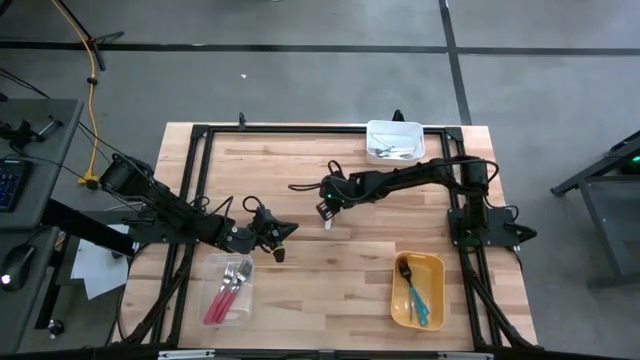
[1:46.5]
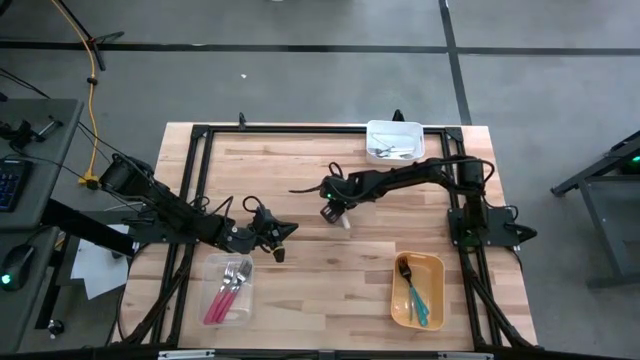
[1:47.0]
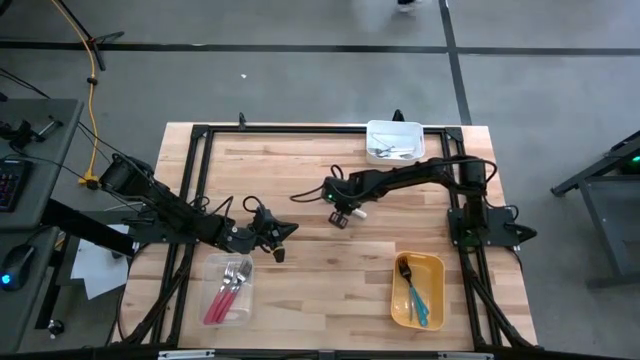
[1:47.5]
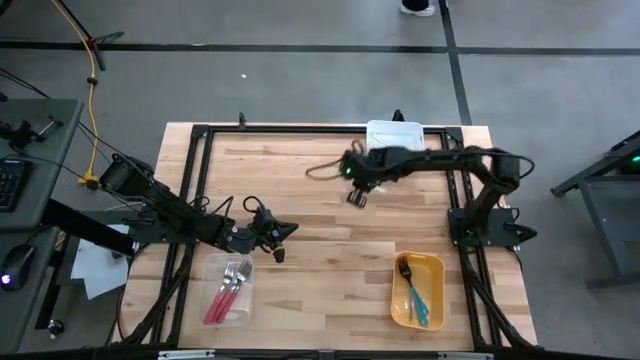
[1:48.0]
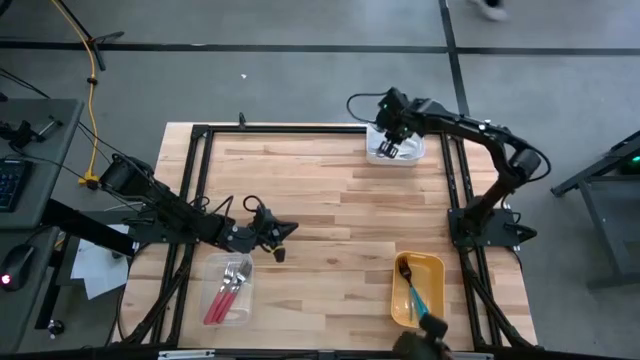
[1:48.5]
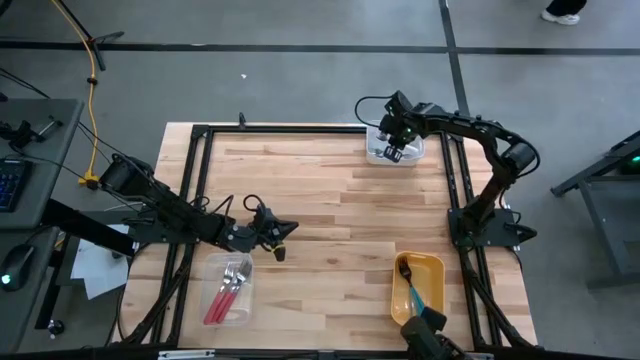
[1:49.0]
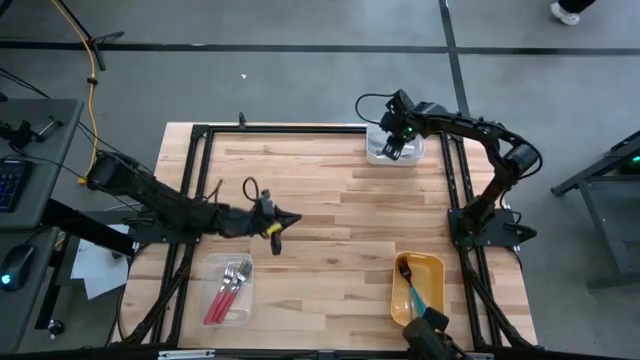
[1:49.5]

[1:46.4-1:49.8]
Task: Sort silverware by color (type)
Put the white fork into the white bin

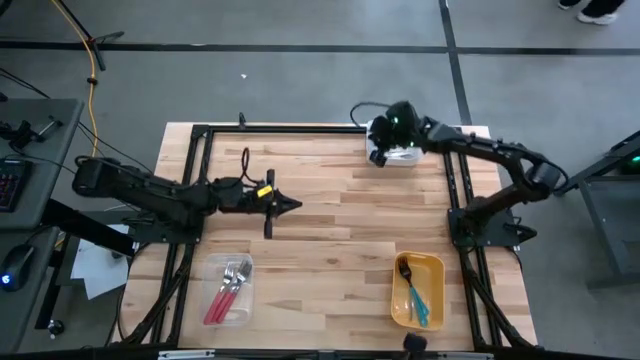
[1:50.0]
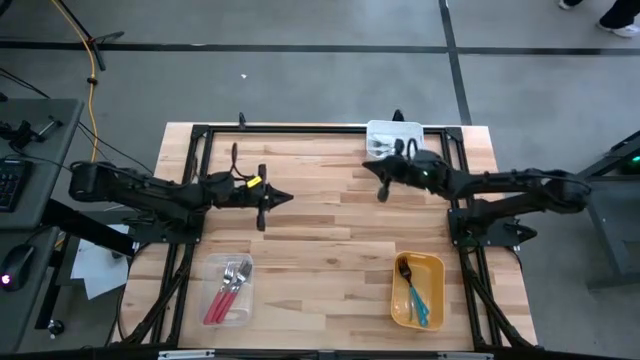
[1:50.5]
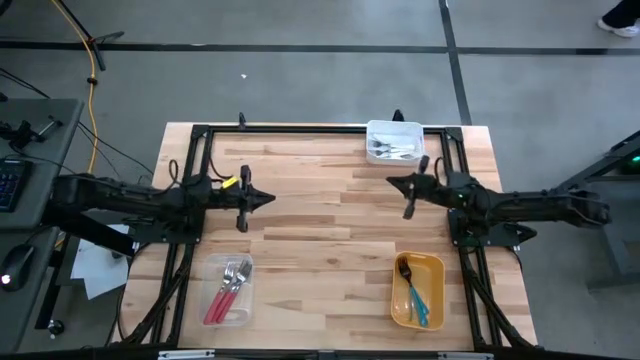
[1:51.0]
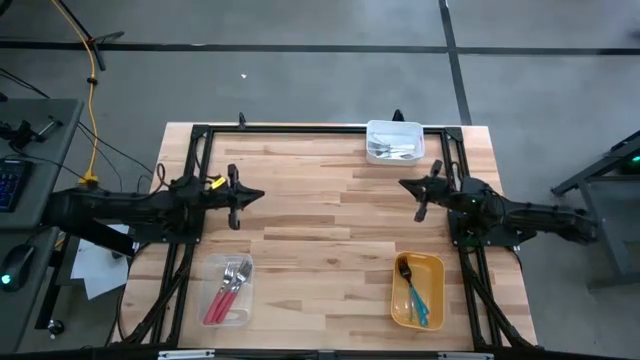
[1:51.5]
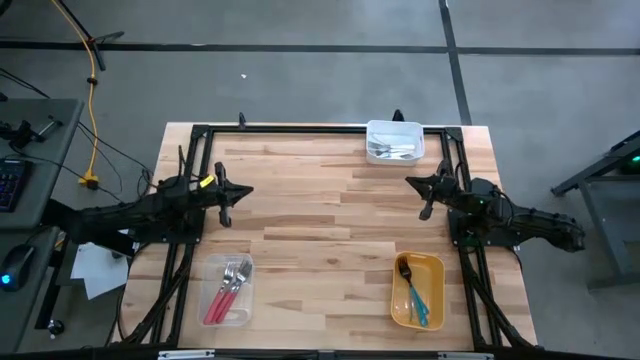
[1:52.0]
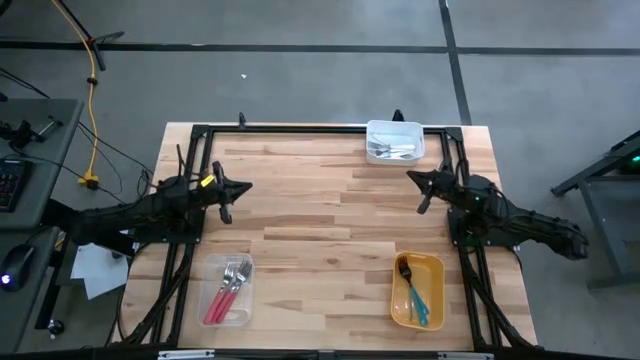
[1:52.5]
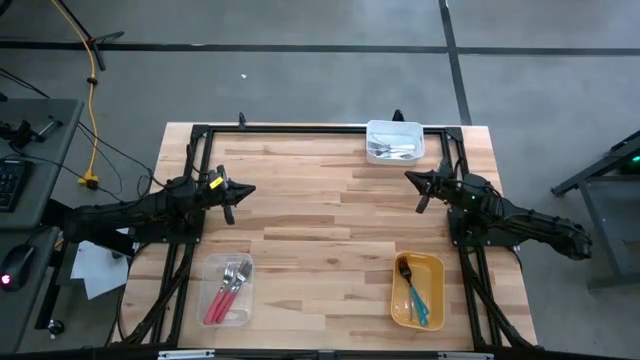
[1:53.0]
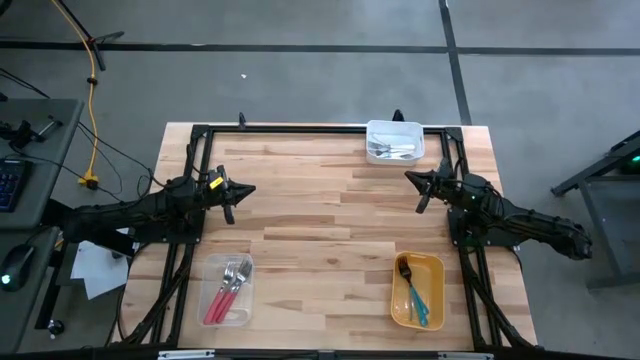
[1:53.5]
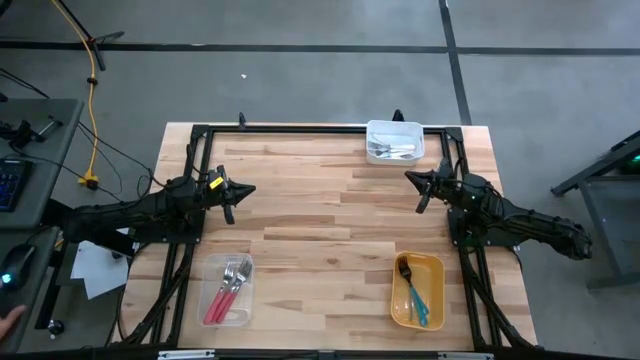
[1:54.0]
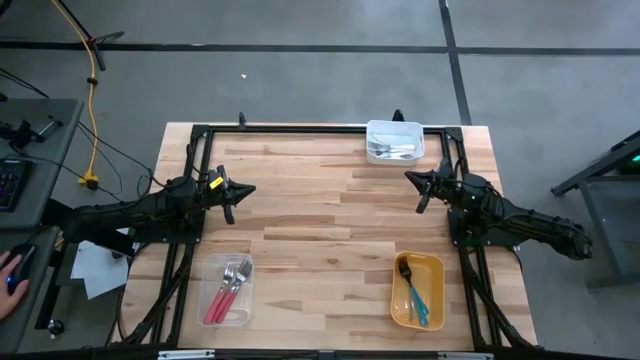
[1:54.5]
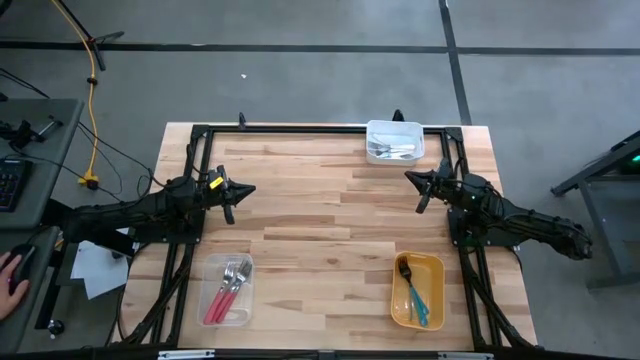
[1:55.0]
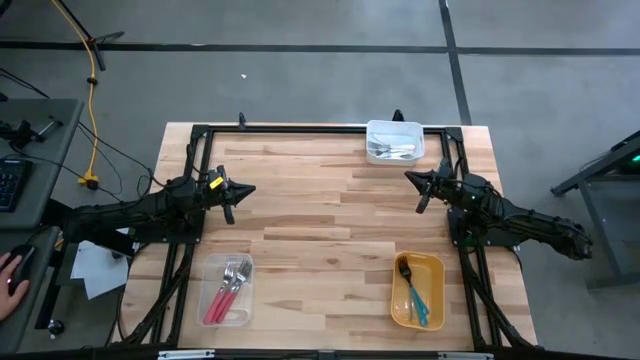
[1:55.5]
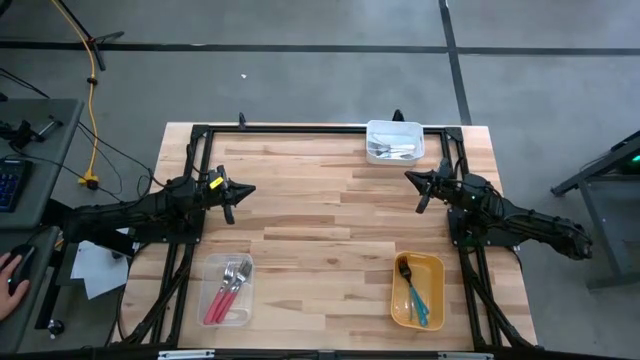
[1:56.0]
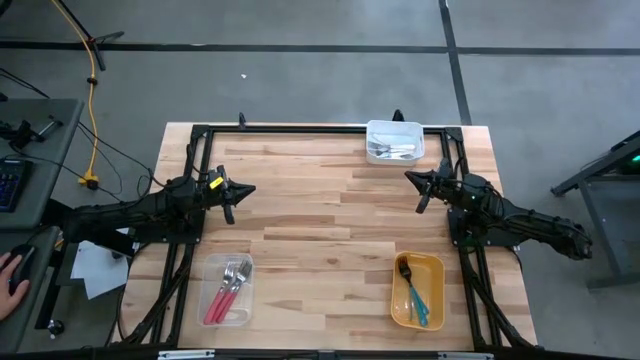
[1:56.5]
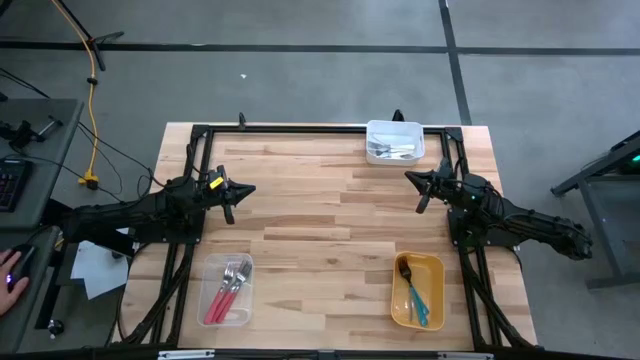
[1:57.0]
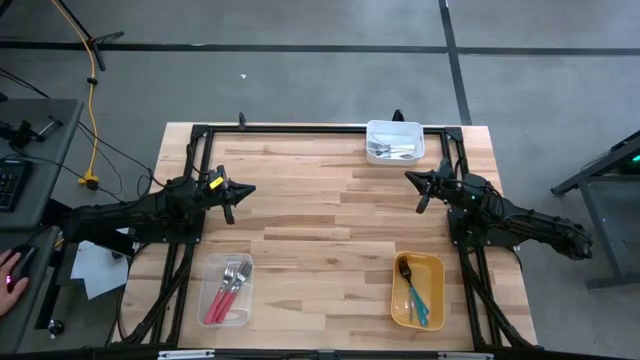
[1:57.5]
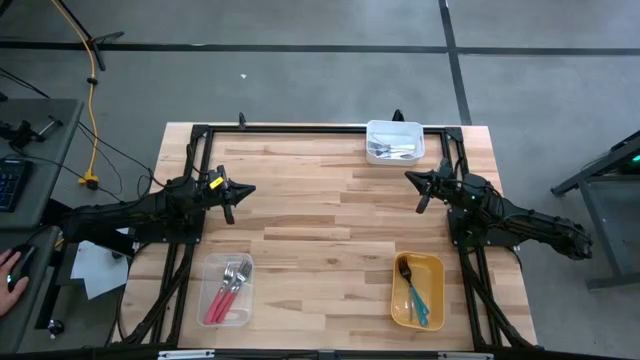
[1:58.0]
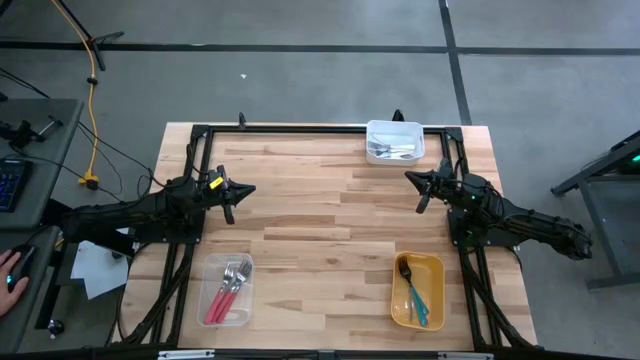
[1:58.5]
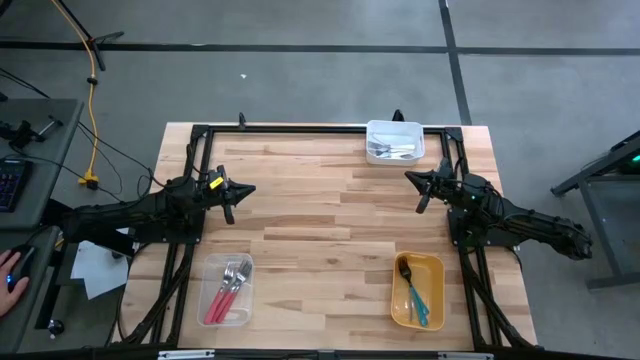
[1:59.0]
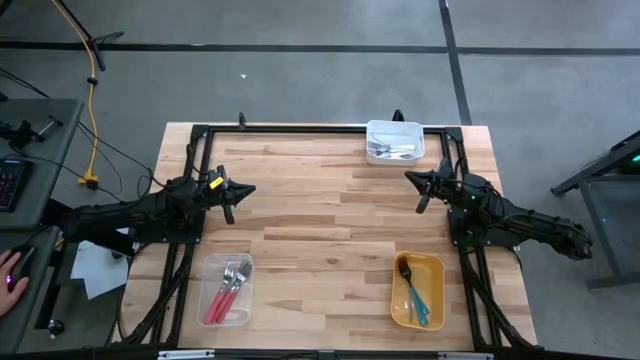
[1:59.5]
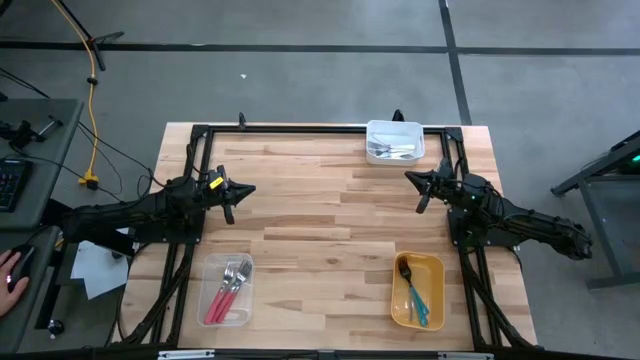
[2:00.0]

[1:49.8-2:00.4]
Return to Home Position

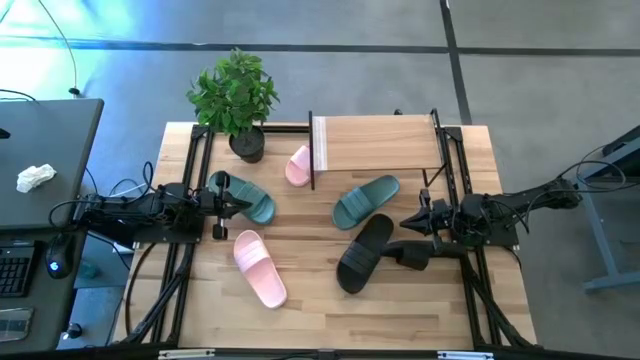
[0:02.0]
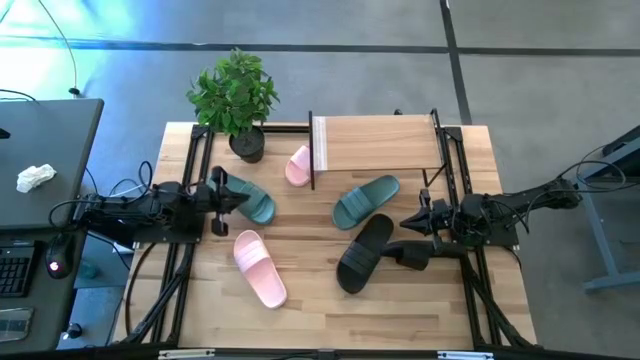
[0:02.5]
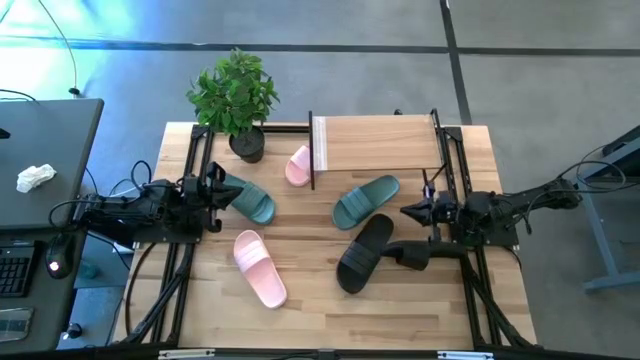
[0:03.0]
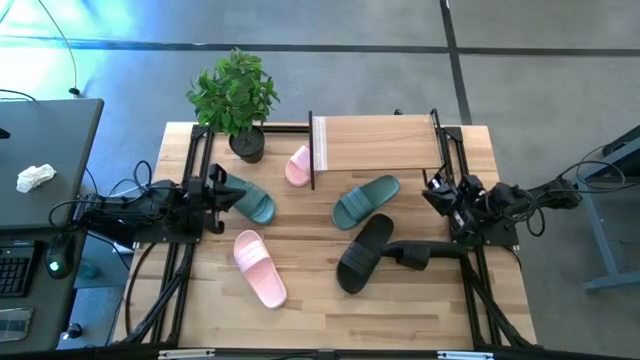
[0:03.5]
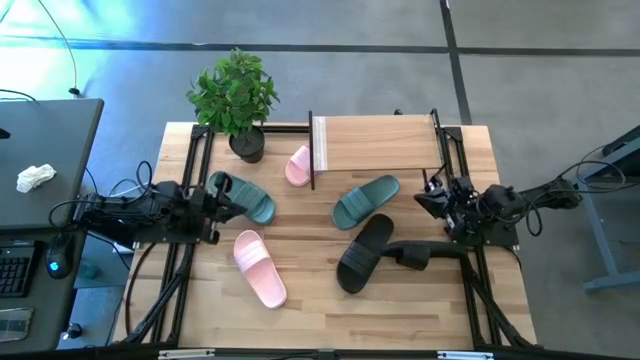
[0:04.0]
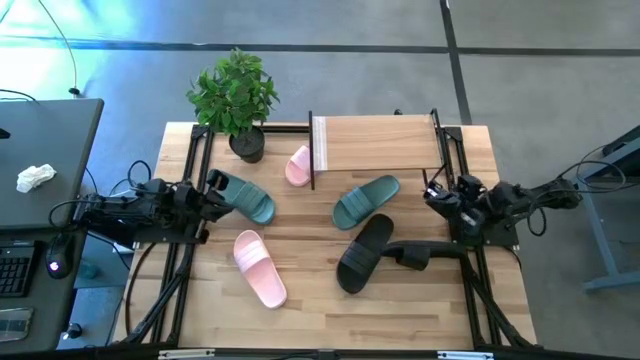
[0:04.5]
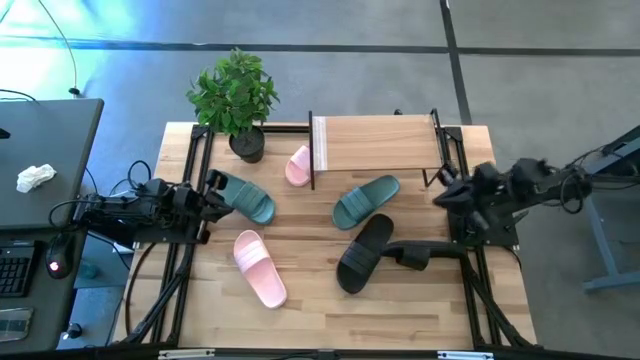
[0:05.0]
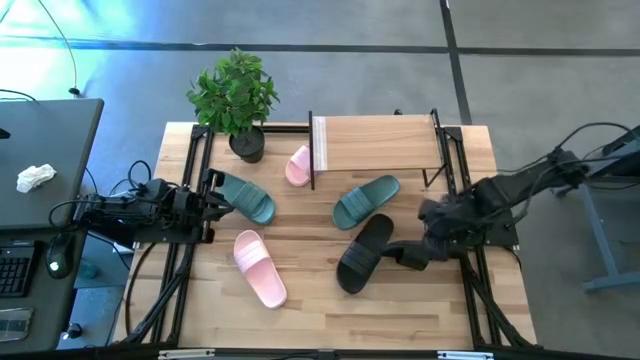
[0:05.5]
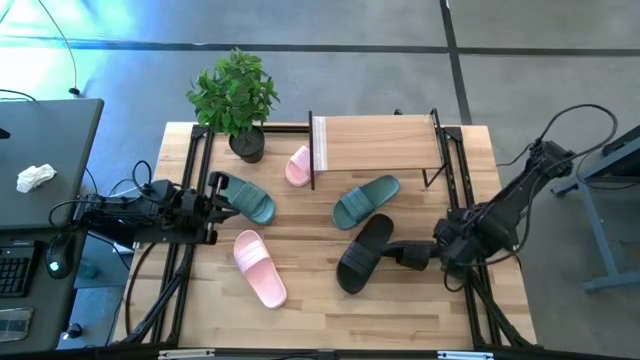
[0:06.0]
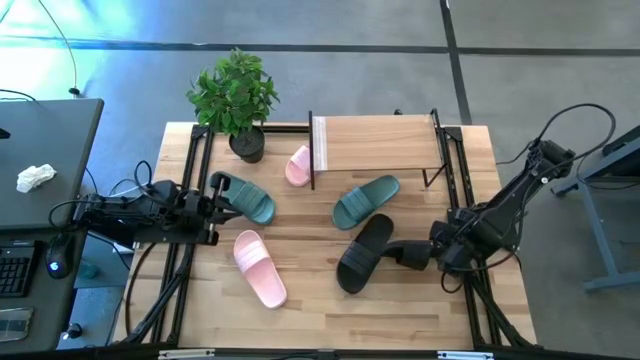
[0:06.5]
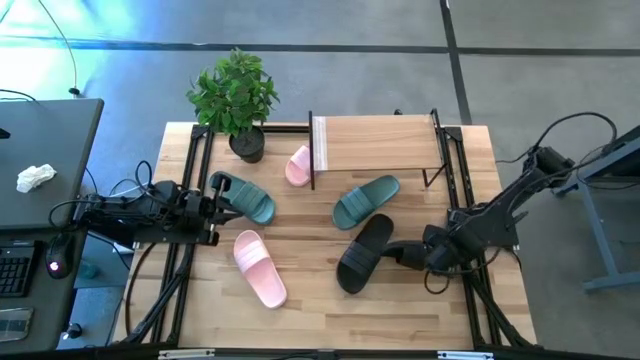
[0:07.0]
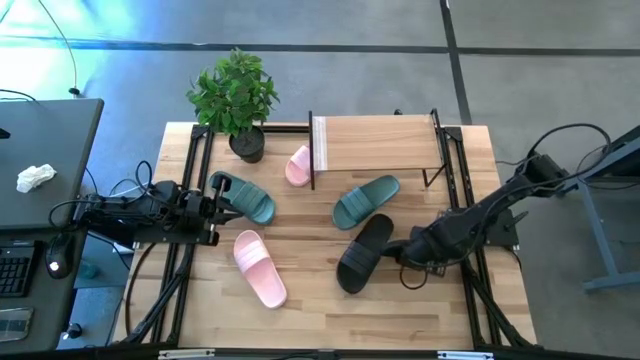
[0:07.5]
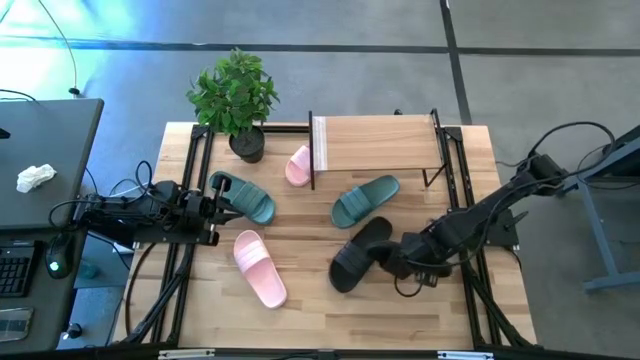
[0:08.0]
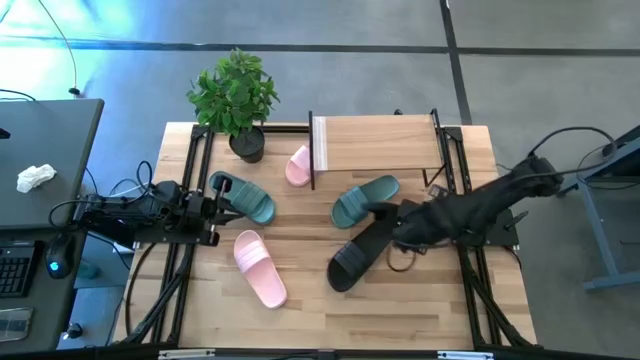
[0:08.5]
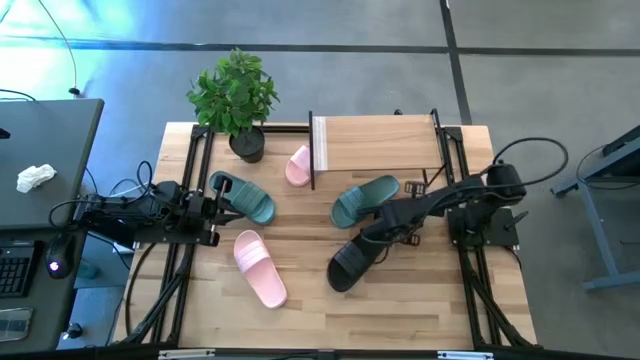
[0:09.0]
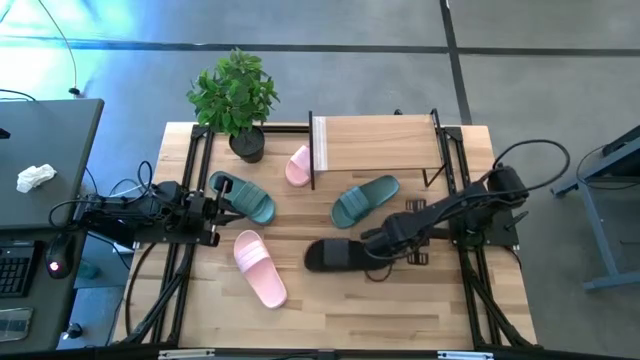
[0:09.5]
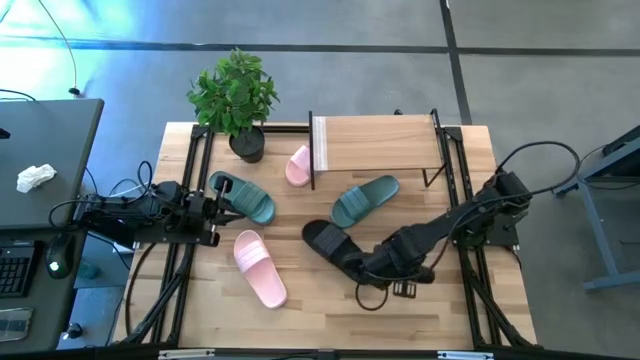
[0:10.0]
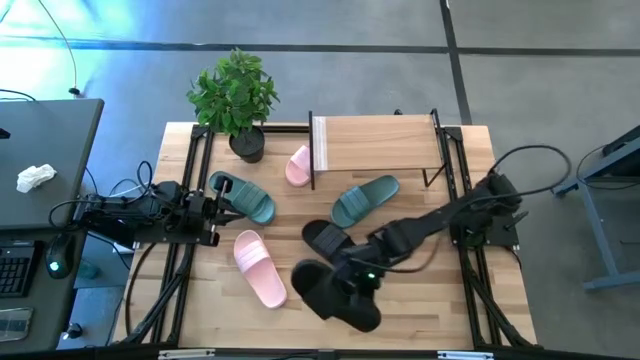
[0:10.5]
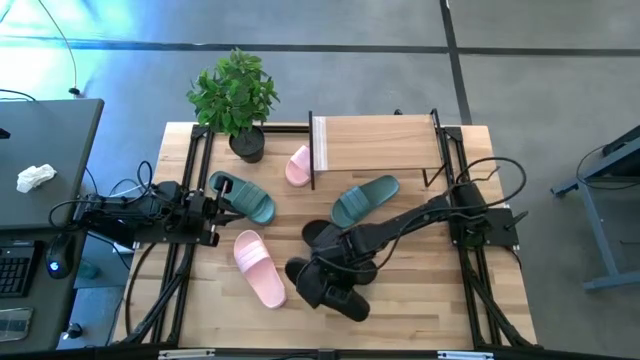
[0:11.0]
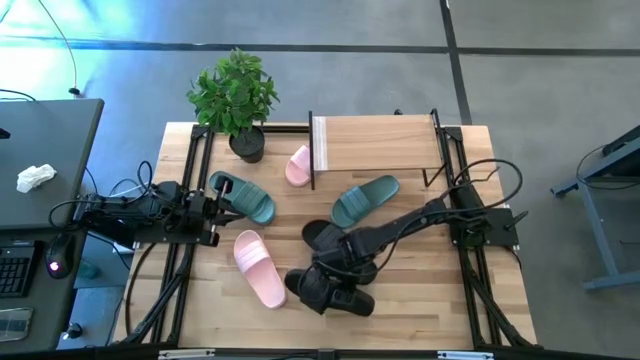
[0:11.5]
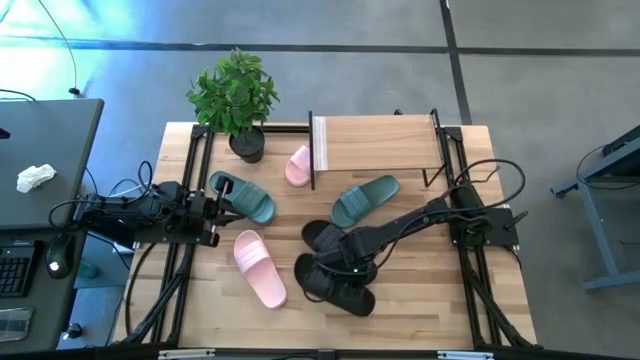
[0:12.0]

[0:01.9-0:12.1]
Task: Pick and place slides into the shelf
Move the right black slide beside the bottom of the black slide
